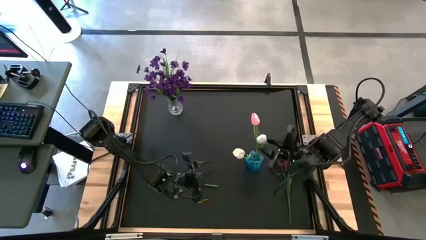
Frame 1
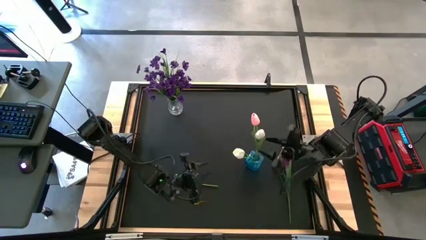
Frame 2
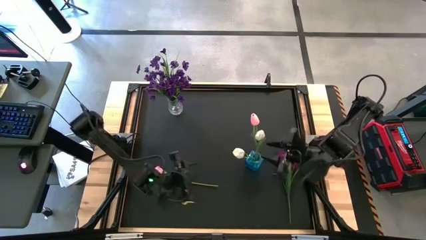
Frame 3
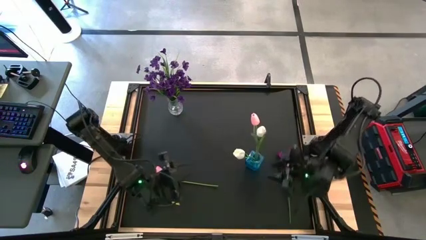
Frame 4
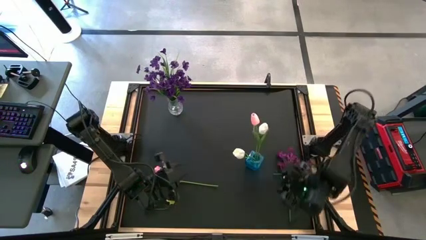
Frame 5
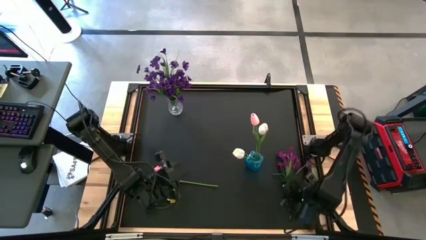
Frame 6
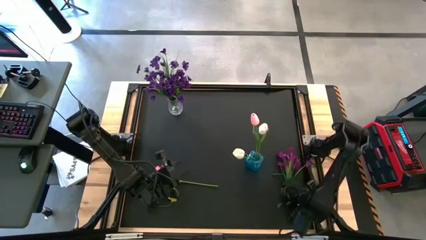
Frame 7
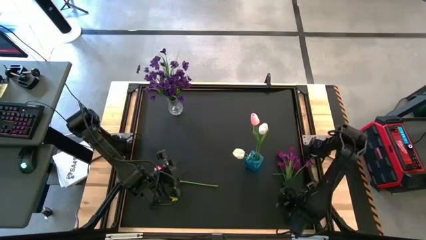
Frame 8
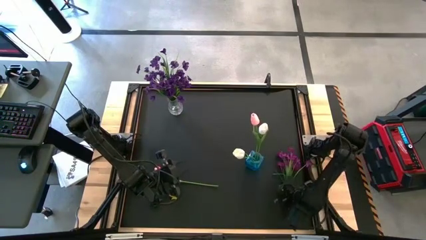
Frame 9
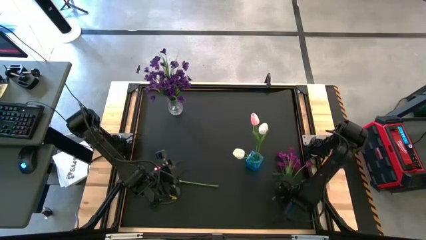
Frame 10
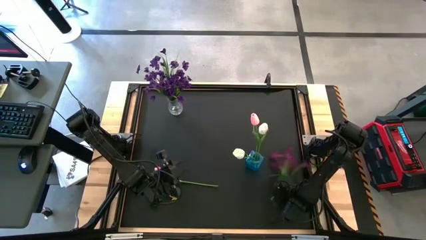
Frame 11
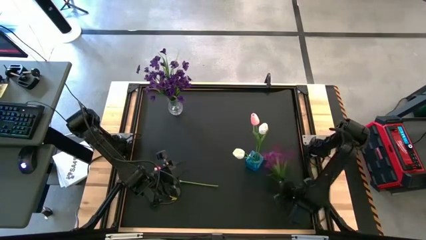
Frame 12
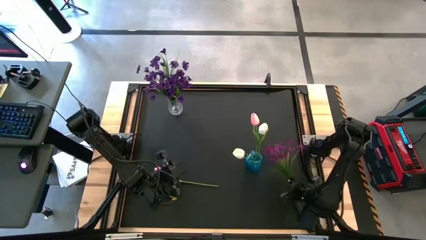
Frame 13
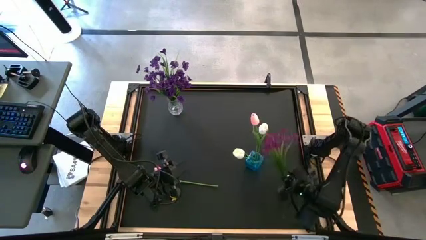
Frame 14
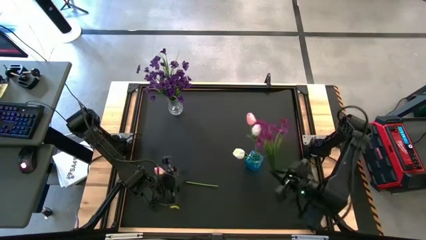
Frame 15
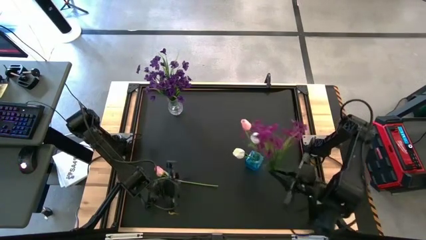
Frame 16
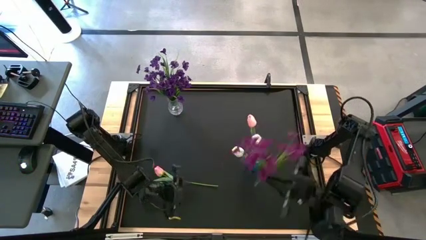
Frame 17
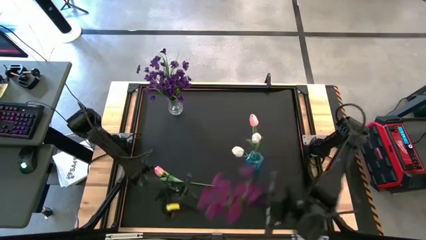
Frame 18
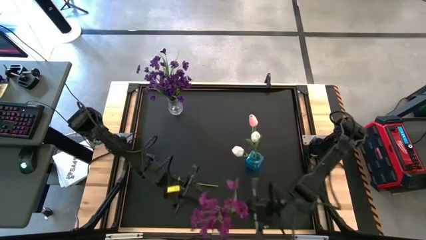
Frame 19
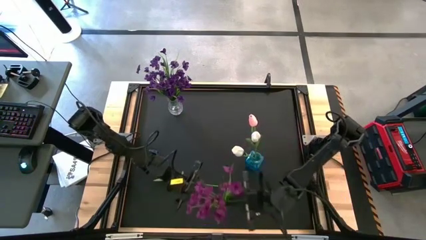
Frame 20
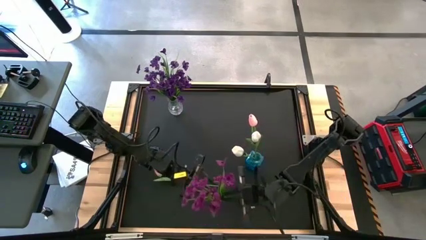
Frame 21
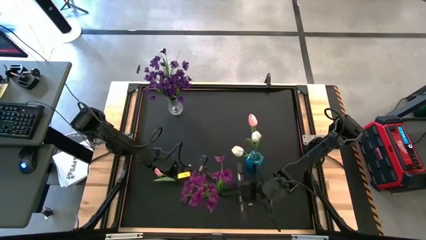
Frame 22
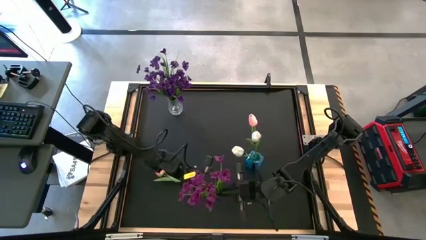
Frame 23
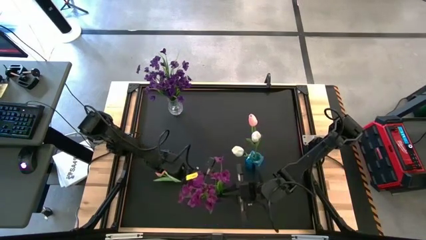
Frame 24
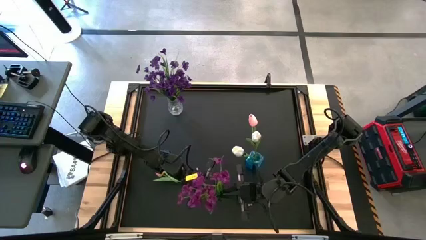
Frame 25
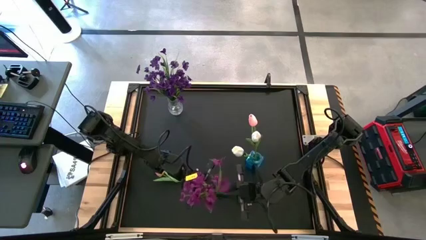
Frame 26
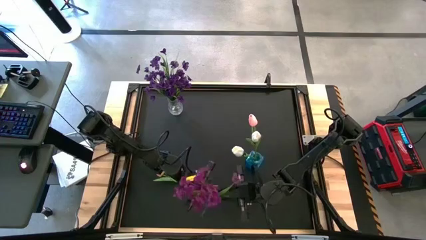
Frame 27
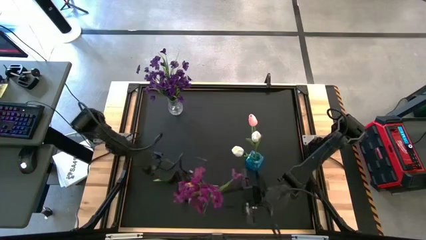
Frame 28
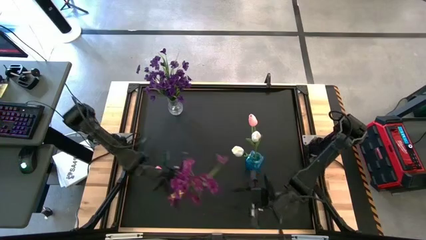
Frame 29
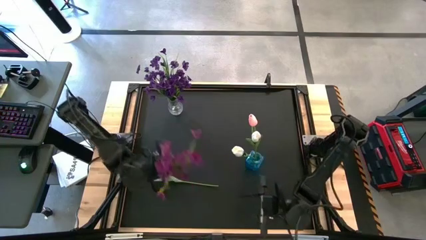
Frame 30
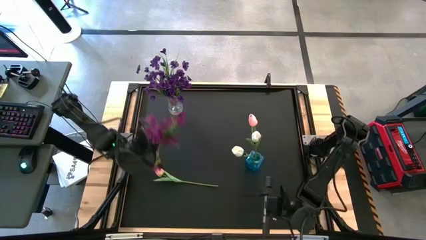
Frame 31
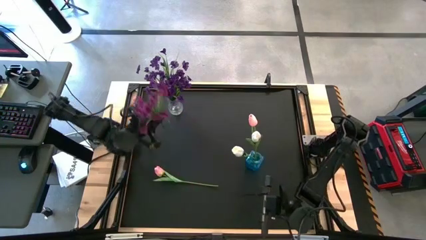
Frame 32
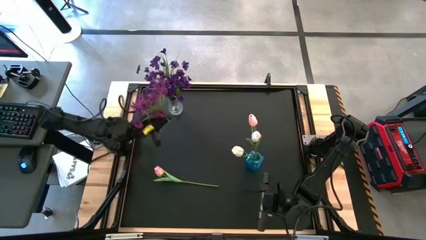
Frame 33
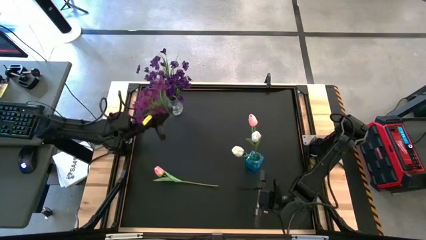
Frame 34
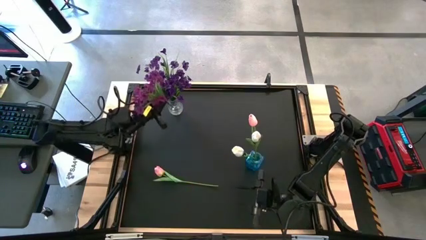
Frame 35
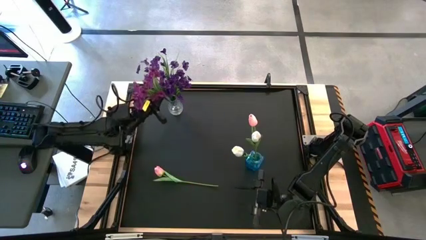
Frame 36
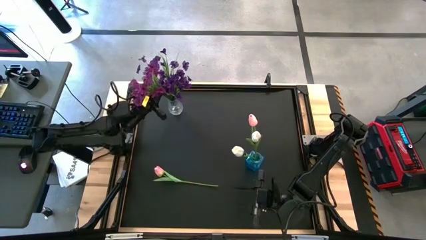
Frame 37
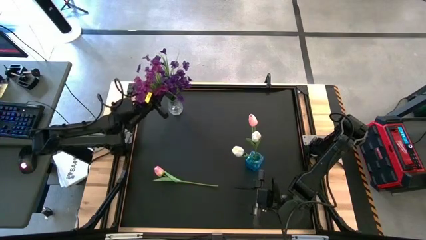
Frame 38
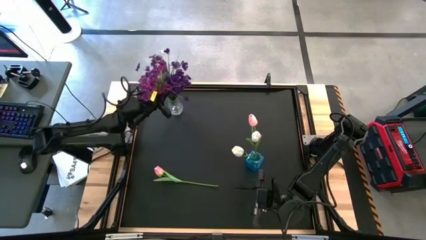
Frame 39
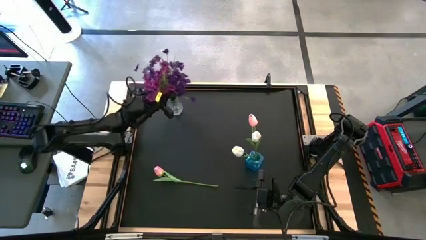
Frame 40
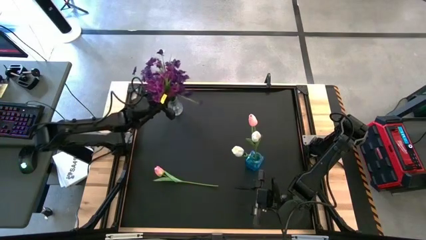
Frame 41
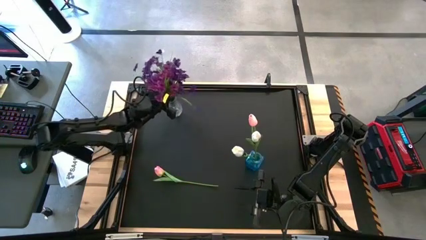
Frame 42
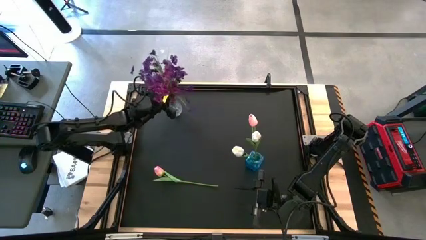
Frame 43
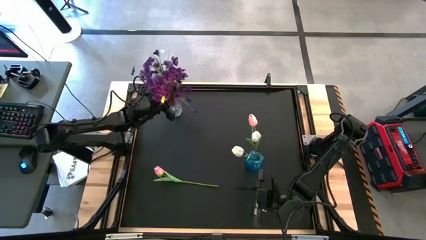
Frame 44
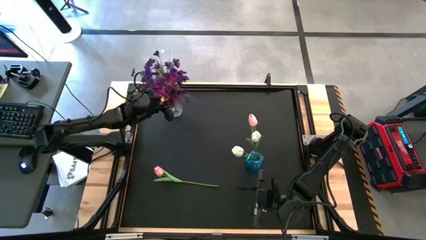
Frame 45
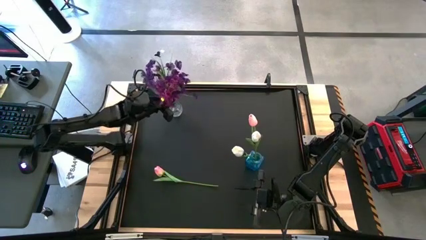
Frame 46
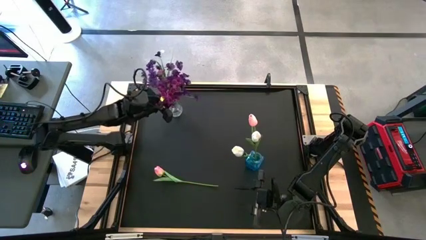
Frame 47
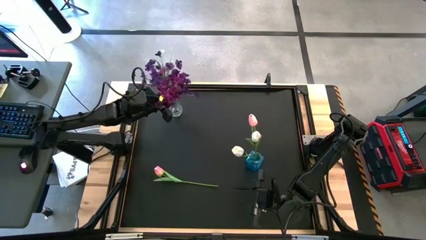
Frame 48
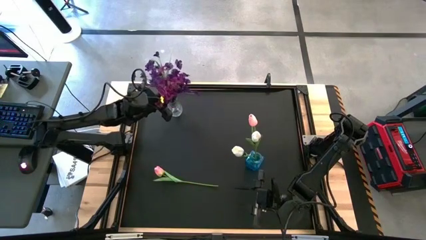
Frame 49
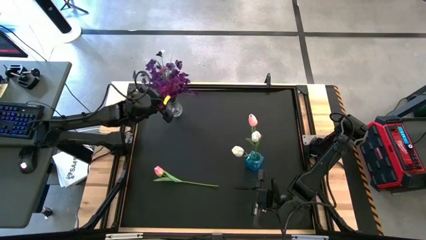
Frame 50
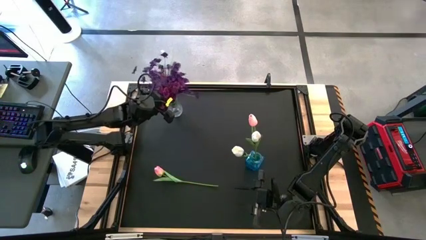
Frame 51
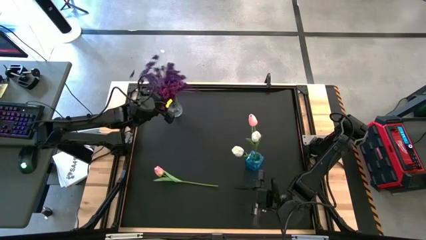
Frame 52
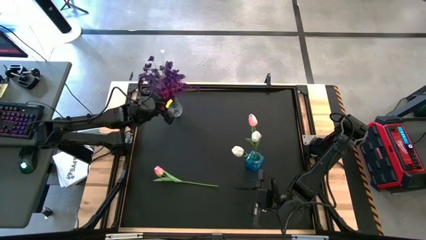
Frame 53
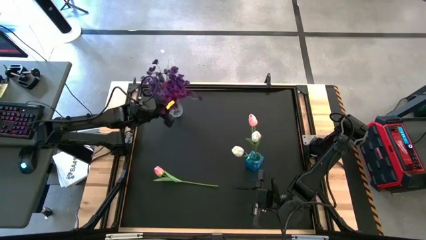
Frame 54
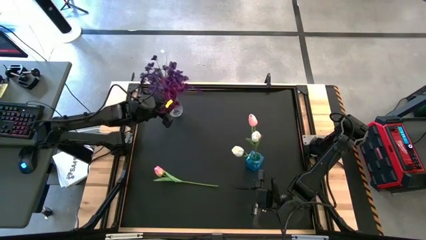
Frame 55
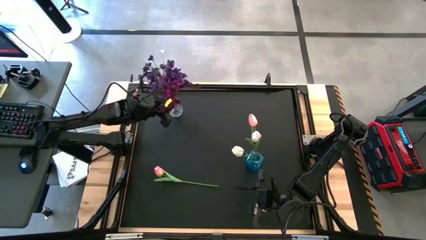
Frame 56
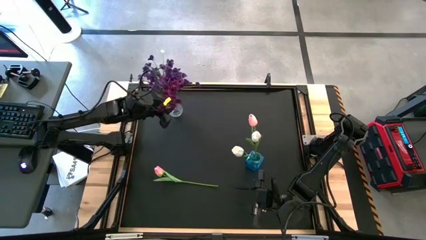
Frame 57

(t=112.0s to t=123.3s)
Task: Sort flowers into vase by color
Put the purple flowers into the transparent white vase

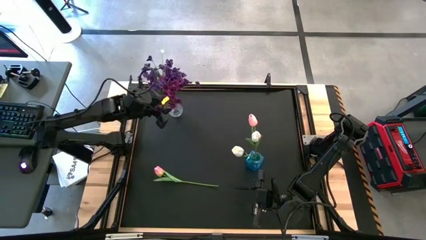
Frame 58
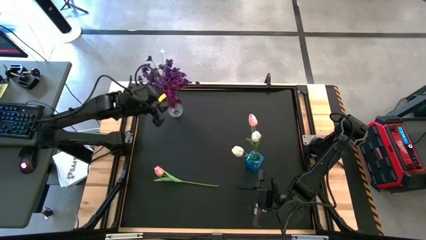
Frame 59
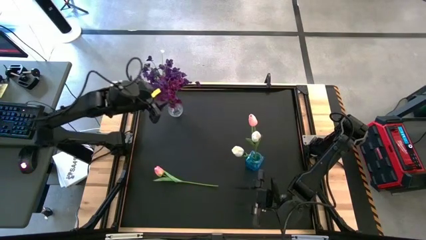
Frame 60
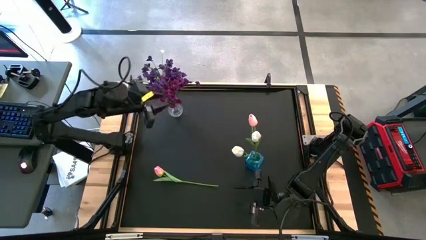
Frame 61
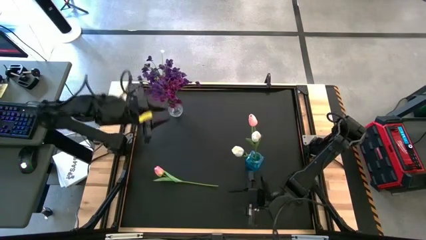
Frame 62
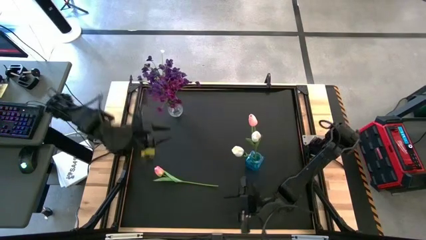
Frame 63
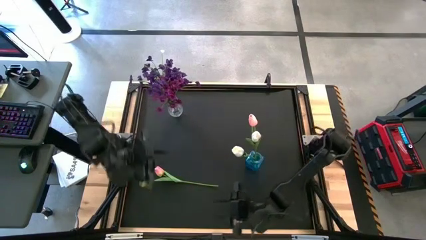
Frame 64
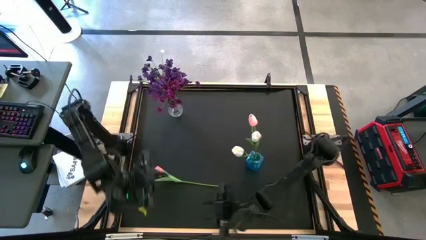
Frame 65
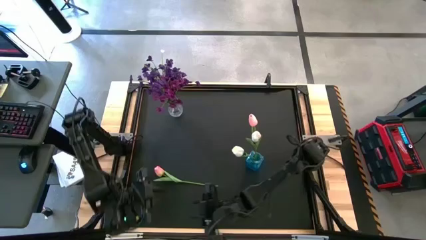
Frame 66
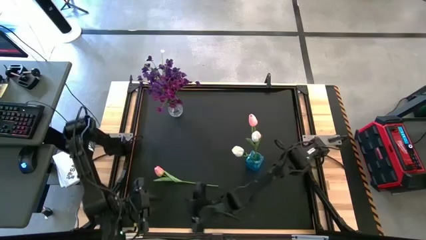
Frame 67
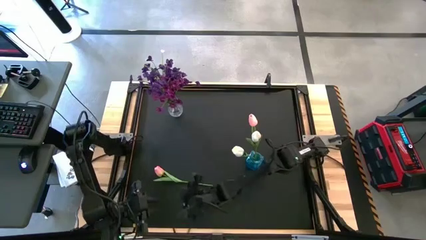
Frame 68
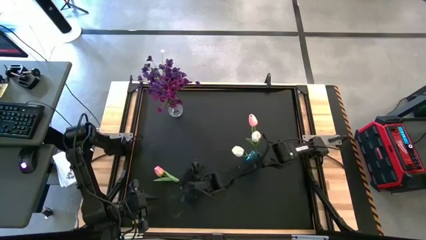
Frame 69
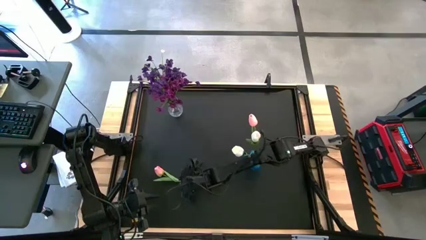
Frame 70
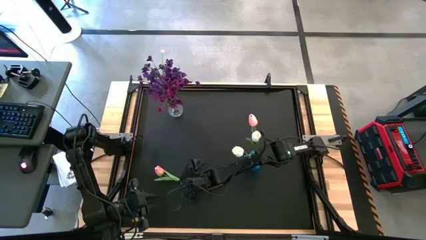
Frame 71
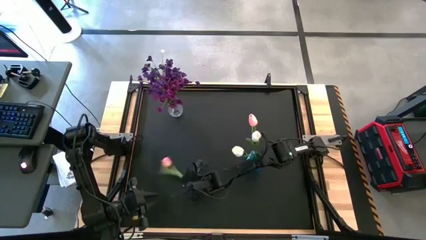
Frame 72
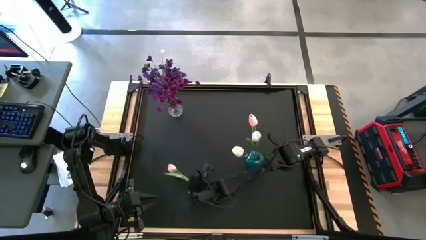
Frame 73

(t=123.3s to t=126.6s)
Put the pink flower into the transparent blue vase
